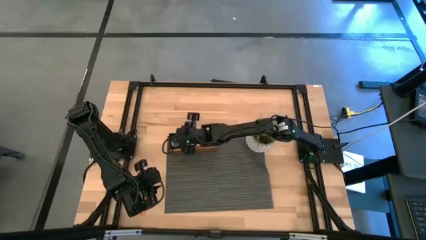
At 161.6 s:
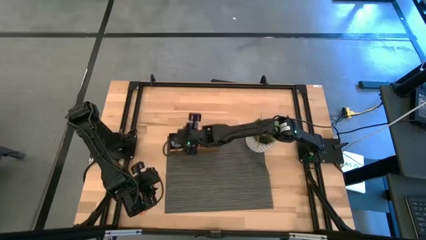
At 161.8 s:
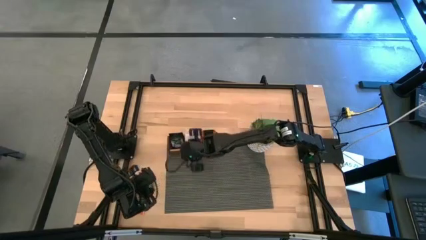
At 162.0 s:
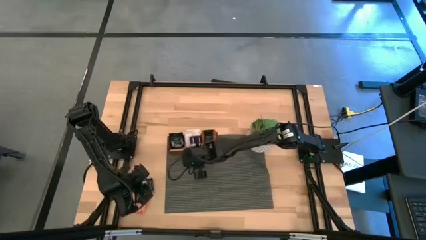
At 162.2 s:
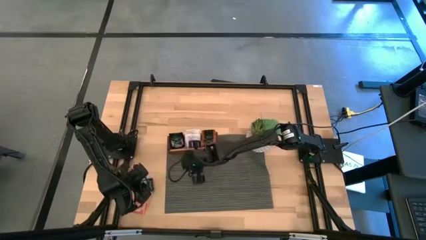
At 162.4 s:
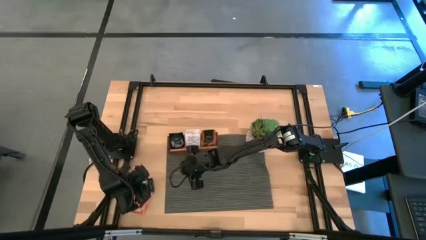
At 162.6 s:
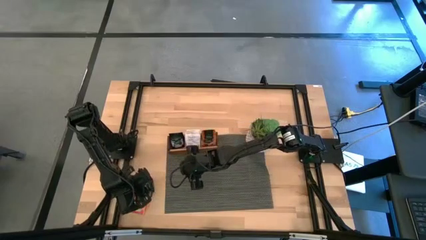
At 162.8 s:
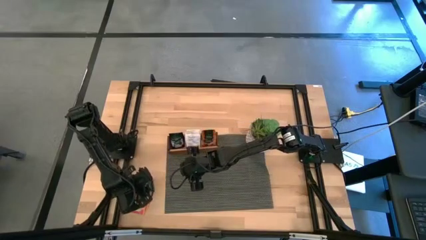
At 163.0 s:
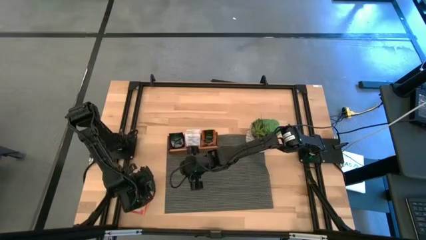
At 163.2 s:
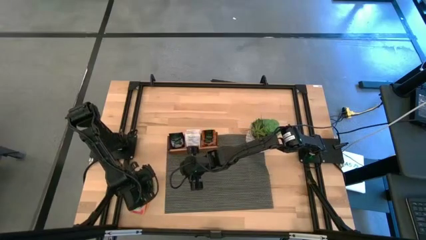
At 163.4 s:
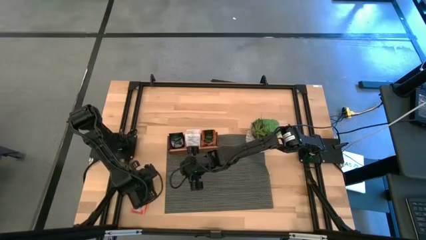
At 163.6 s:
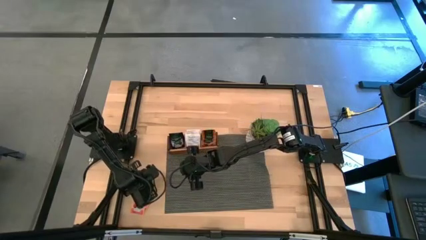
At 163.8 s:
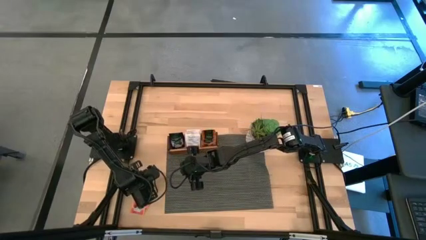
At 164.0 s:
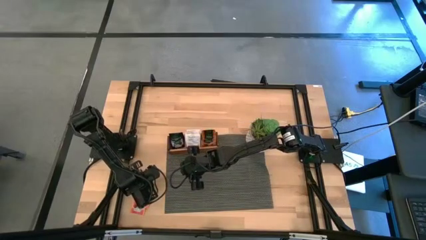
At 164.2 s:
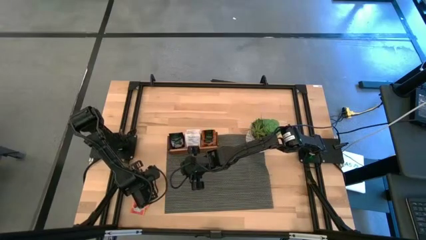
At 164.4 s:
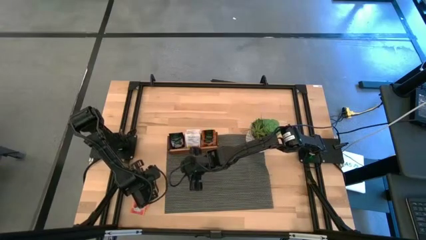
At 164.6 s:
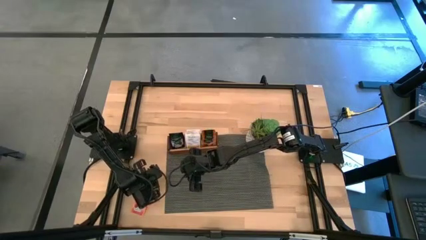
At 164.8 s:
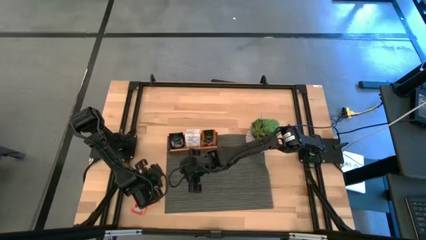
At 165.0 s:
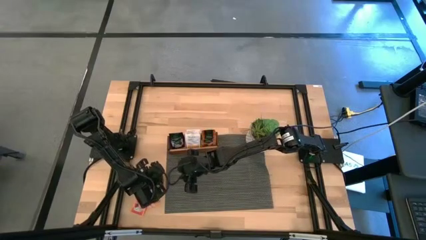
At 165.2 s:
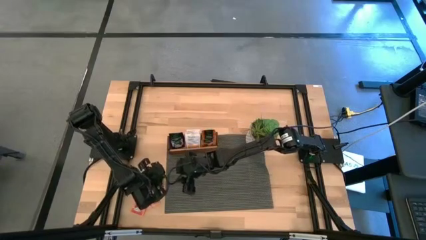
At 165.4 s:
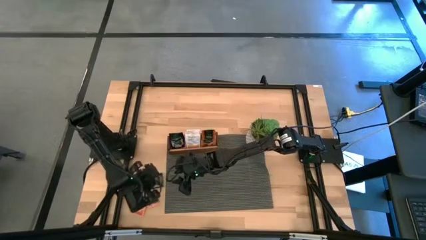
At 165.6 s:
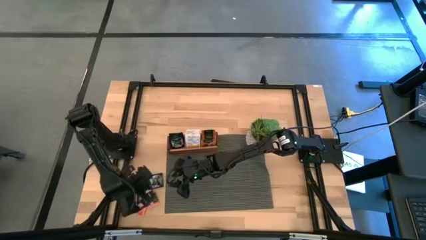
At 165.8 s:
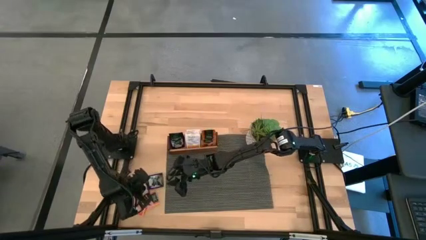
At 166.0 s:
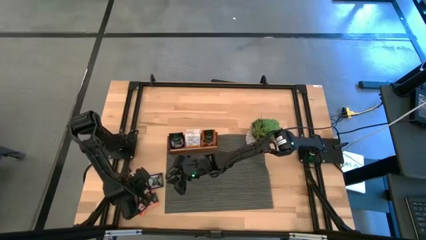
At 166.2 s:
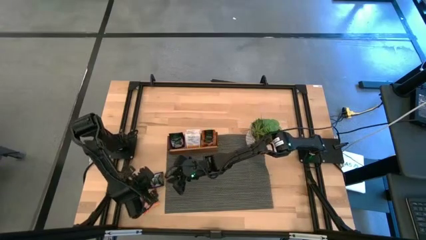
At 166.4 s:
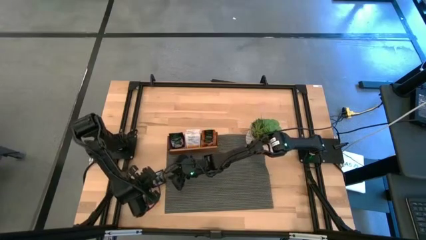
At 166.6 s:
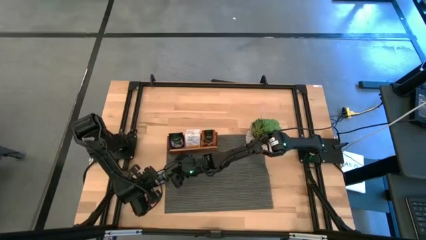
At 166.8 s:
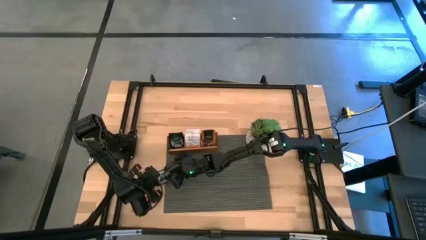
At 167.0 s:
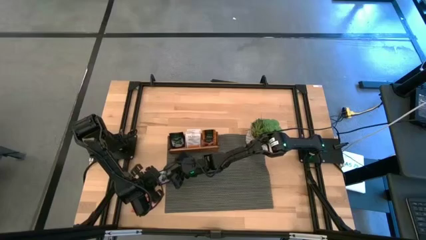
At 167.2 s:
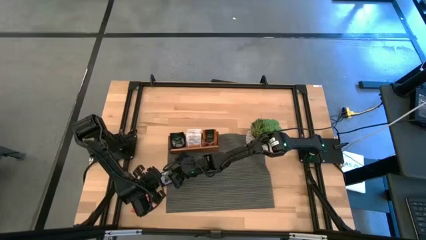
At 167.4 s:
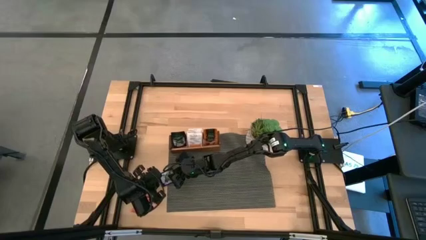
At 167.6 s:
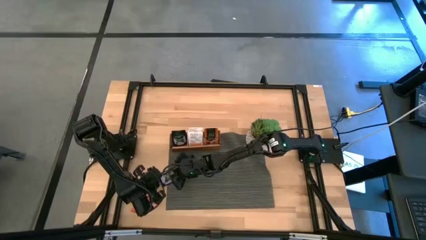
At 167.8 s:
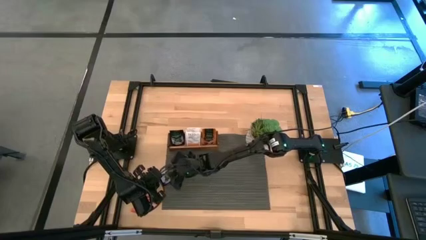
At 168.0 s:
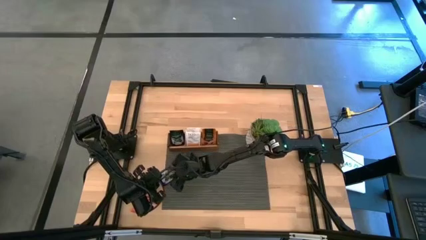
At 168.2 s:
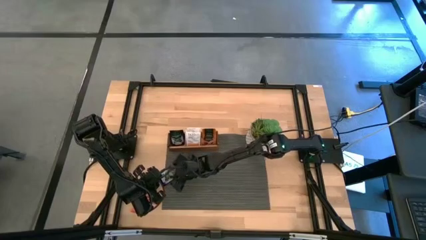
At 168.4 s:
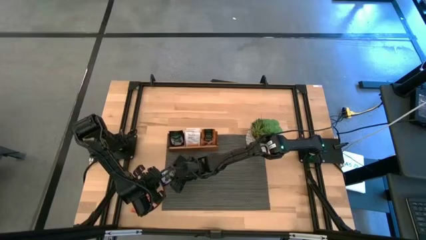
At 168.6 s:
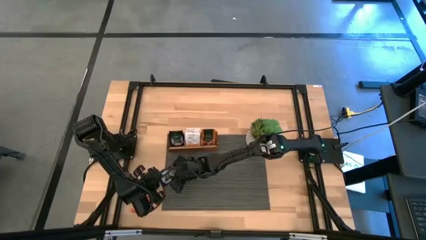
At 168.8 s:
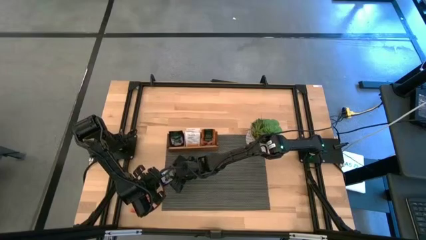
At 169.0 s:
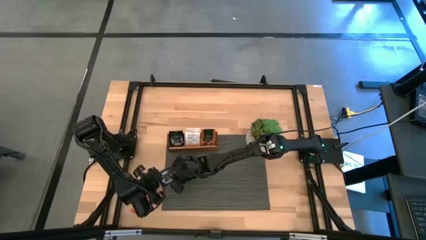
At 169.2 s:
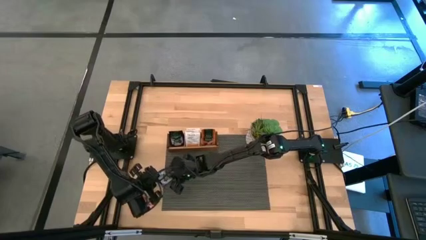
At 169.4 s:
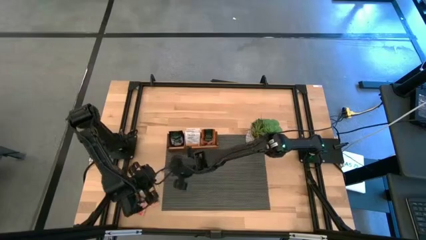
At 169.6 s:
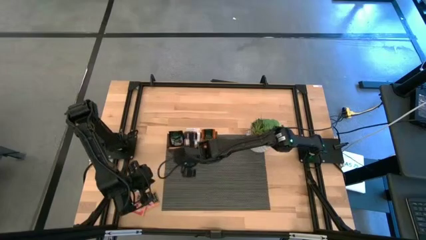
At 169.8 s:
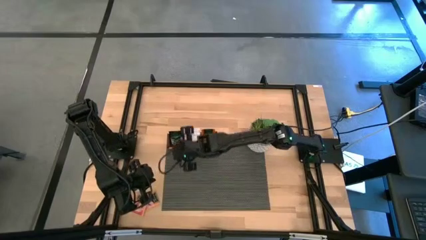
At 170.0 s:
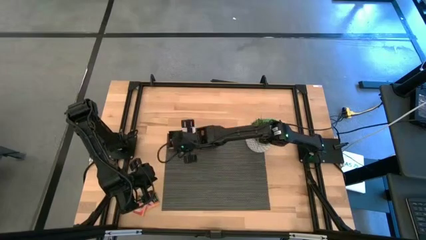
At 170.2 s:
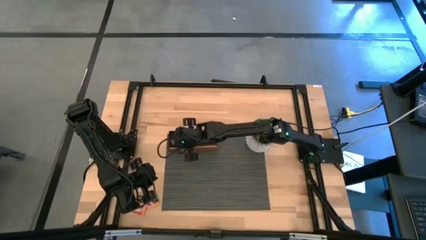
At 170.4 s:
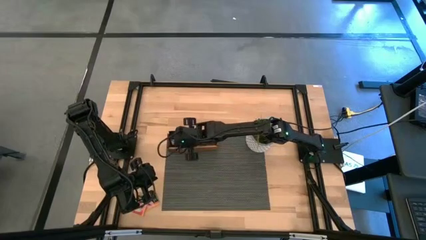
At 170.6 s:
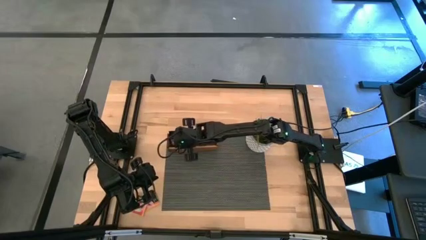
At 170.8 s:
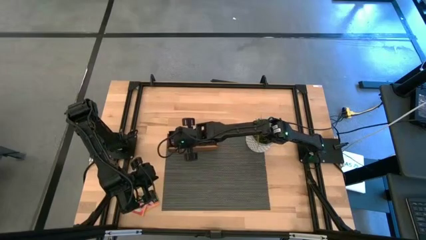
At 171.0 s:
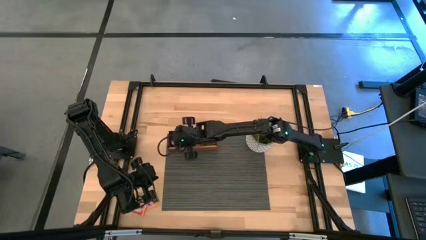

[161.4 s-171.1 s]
Task: Pick & Place Tea
Put the violet tea bag to the left section of the wooden organizer

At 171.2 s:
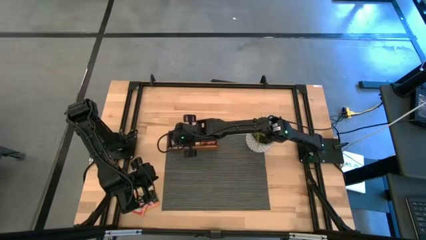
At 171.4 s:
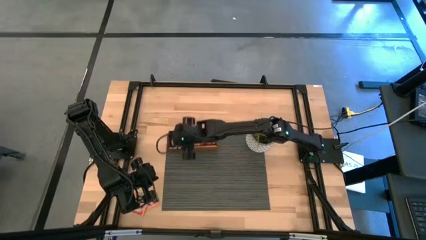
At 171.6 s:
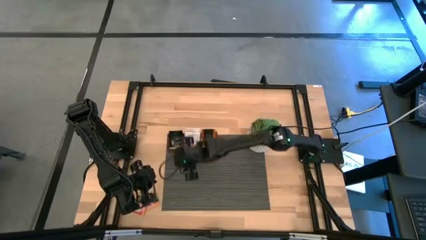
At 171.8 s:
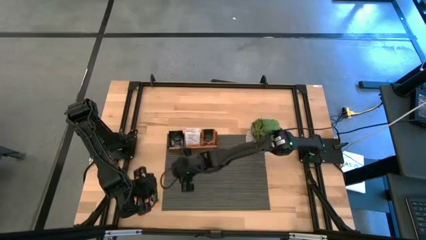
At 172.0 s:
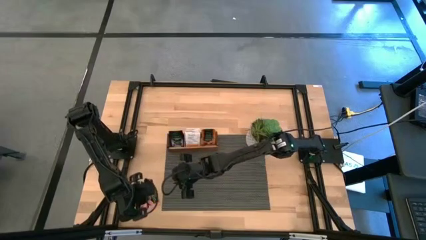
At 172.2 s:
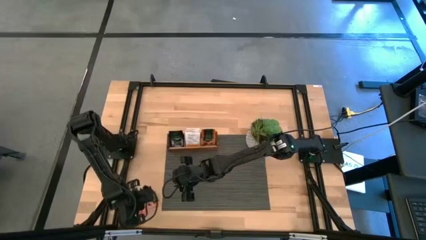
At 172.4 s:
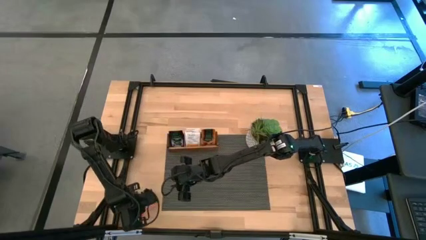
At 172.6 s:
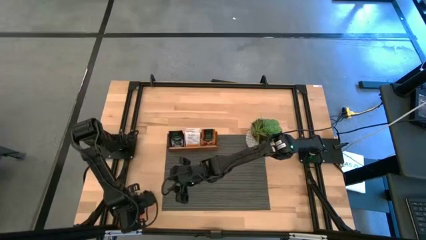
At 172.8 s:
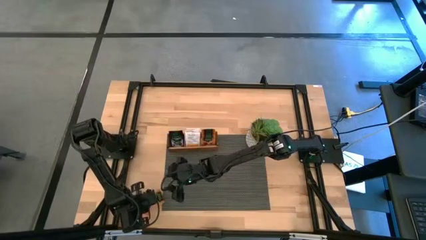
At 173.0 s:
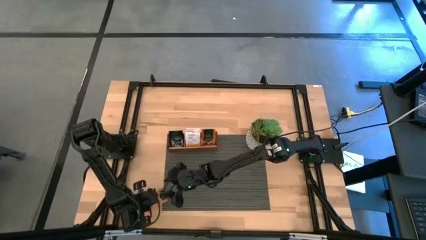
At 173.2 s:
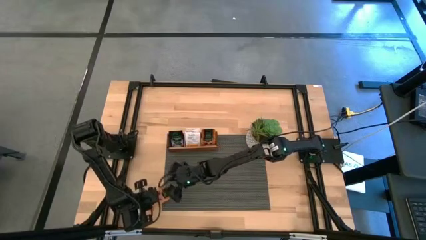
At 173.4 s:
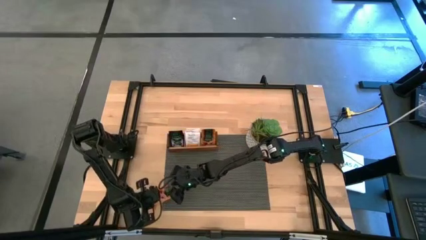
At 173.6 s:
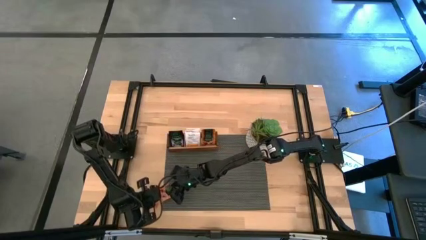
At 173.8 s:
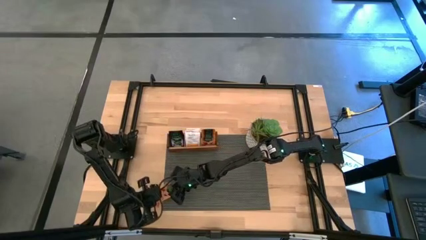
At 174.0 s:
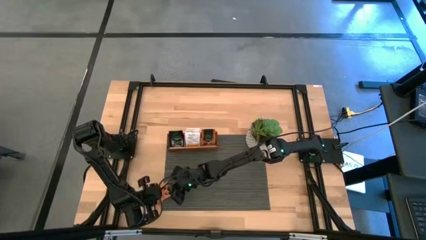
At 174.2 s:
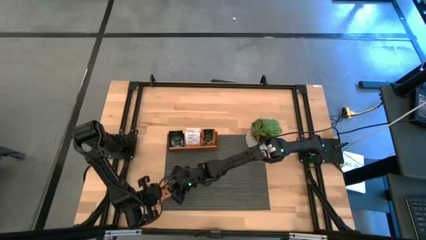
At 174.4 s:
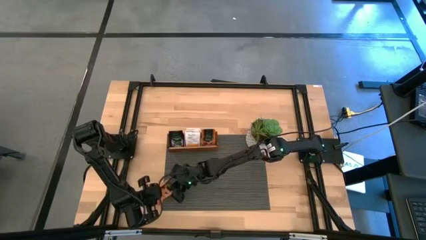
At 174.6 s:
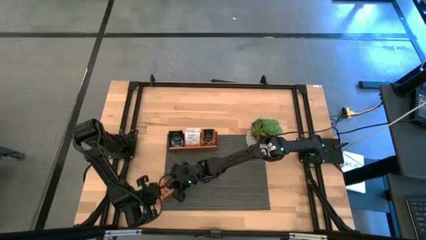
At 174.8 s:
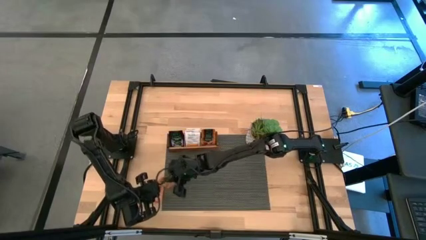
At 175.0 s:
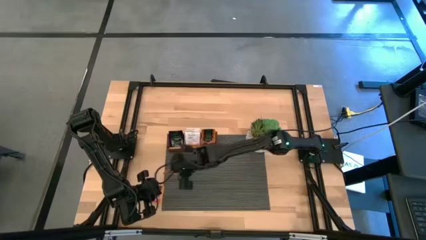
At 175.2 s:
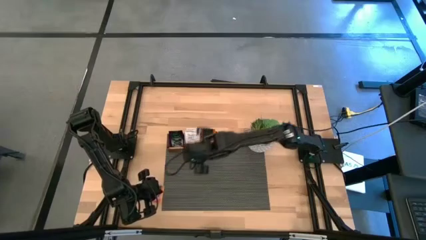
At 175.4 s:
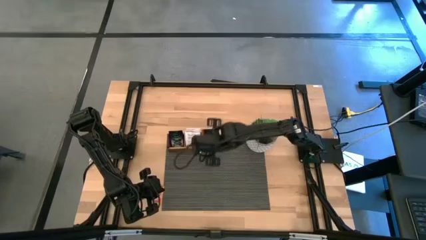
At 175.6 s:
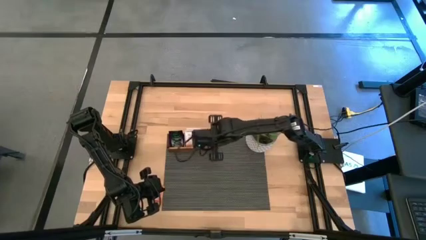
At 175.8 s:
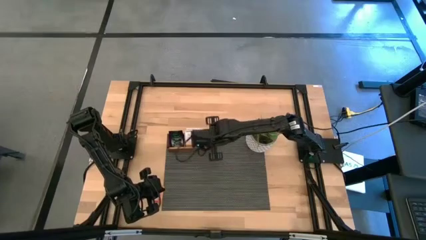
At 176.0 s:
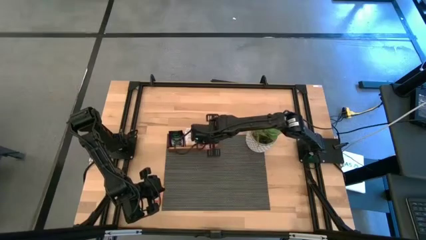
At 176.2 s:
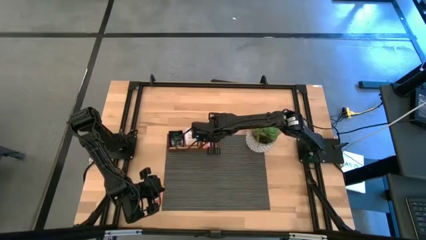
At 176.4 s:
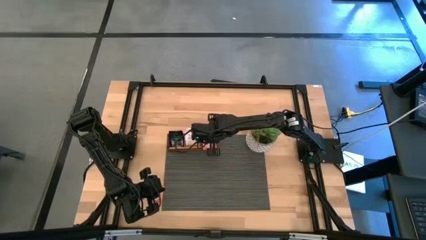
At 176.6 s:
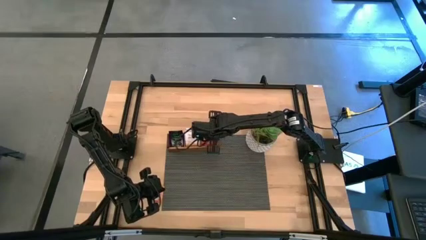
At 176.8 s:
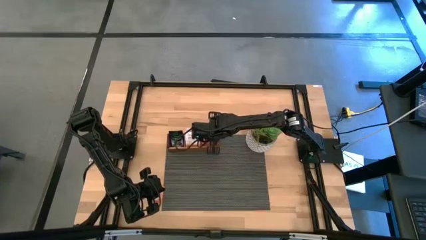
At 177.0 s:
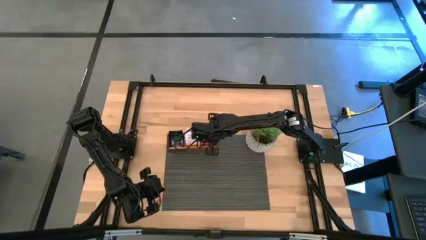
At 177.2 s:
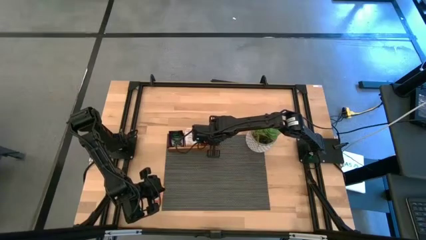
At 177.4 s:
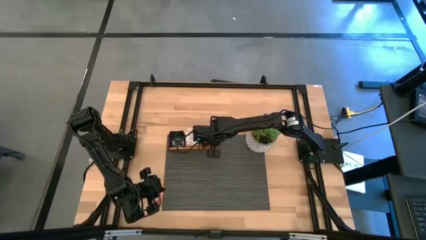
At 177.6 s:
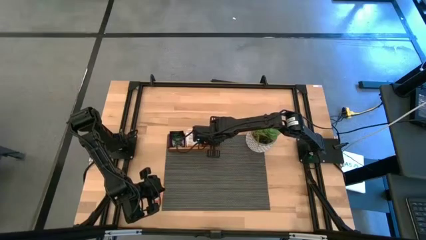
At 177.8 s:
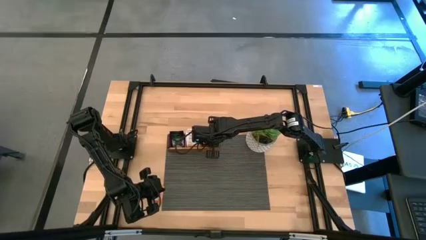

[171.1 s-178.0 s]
Put the orange tea bag to the right section of the wooden organizer
